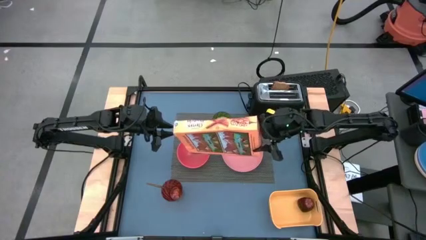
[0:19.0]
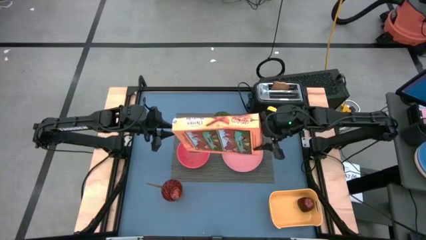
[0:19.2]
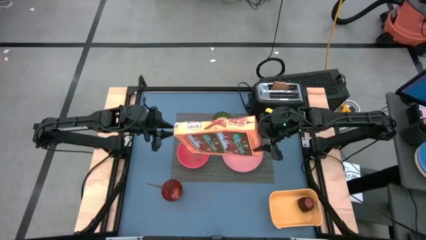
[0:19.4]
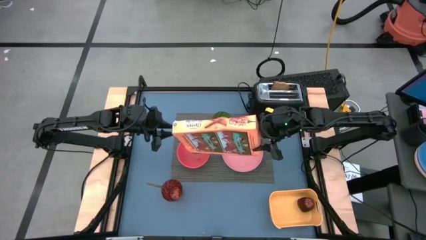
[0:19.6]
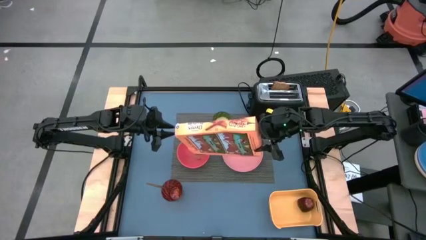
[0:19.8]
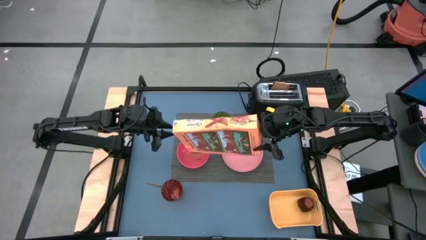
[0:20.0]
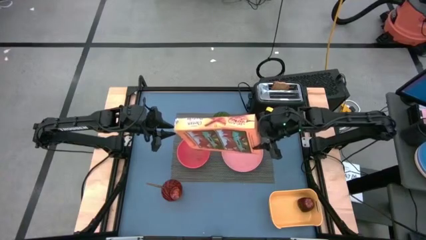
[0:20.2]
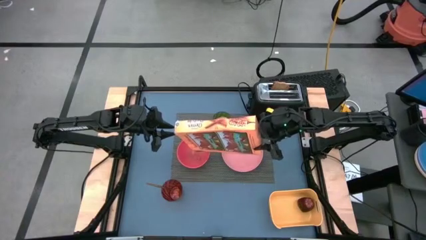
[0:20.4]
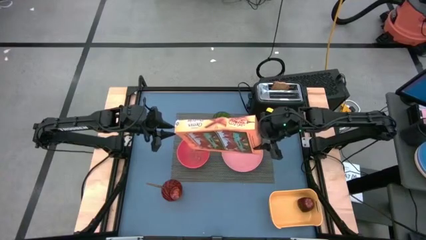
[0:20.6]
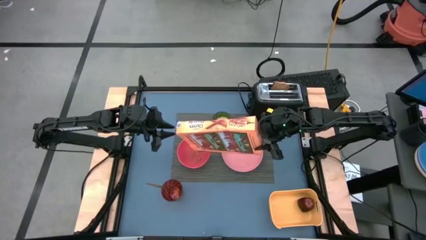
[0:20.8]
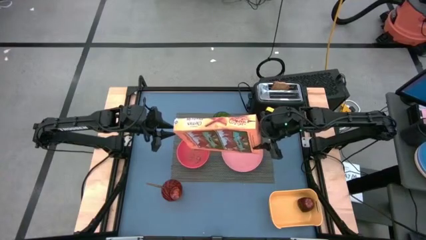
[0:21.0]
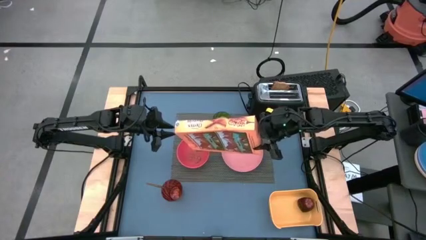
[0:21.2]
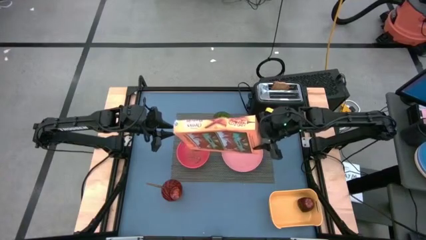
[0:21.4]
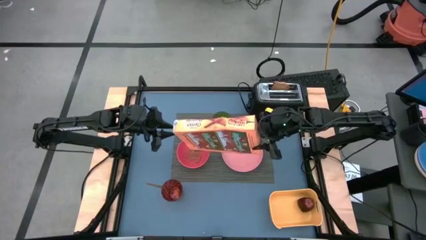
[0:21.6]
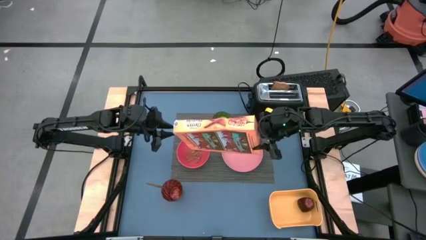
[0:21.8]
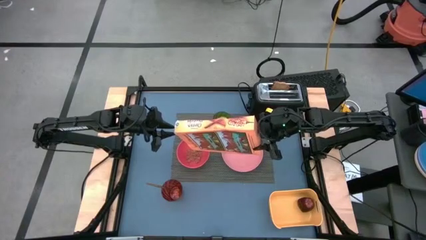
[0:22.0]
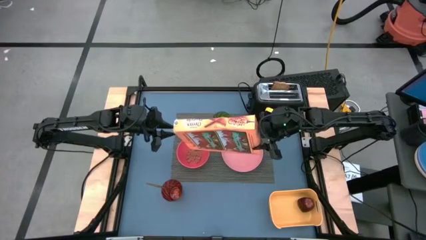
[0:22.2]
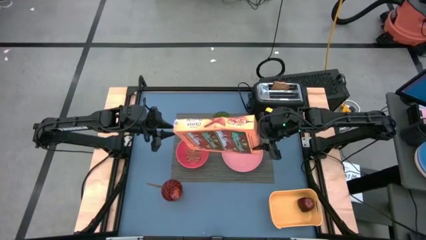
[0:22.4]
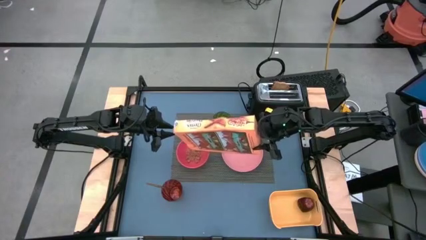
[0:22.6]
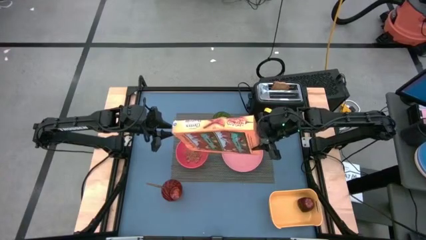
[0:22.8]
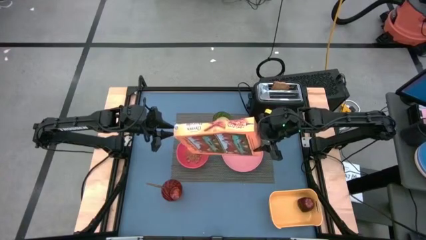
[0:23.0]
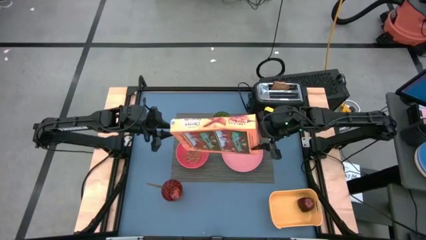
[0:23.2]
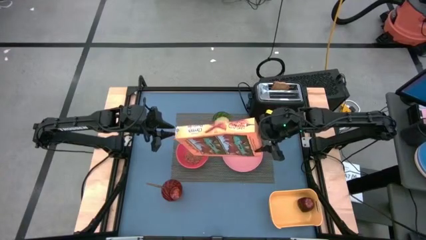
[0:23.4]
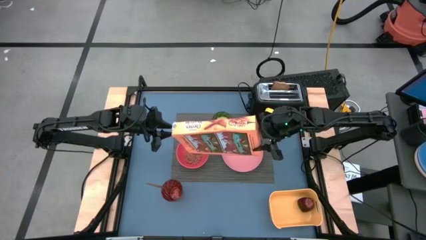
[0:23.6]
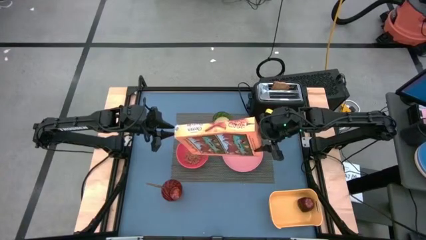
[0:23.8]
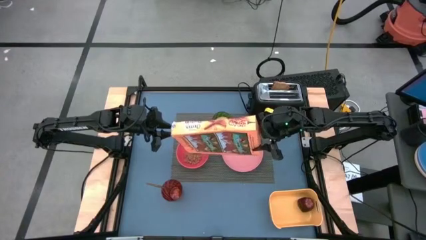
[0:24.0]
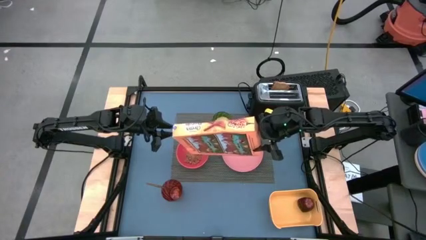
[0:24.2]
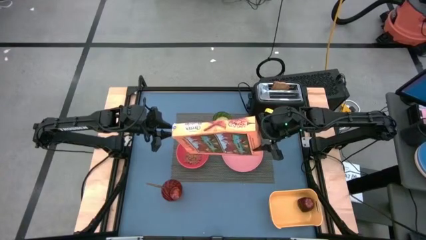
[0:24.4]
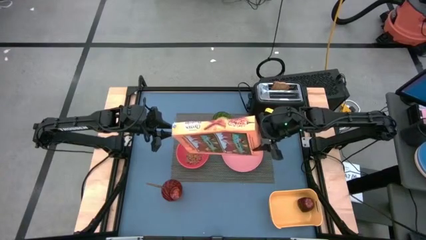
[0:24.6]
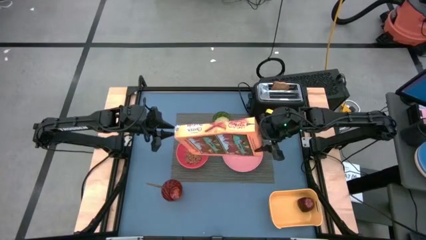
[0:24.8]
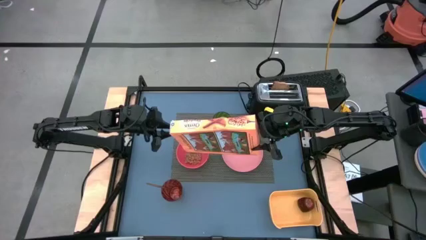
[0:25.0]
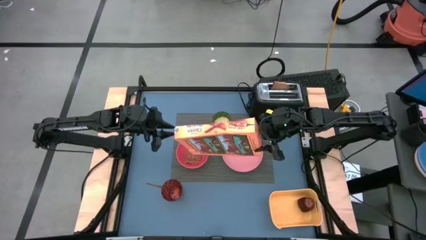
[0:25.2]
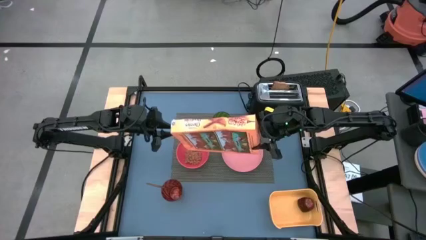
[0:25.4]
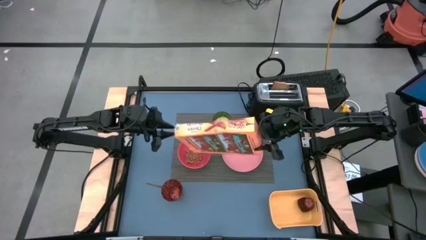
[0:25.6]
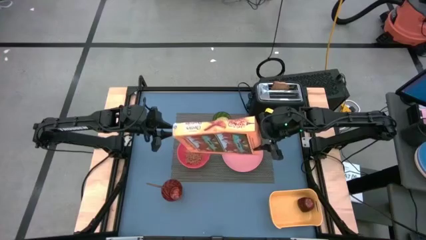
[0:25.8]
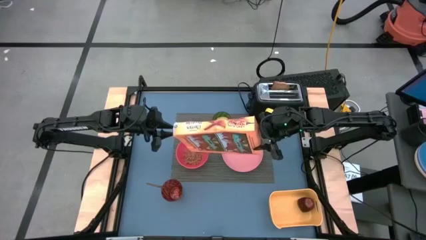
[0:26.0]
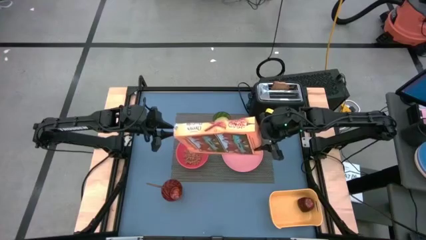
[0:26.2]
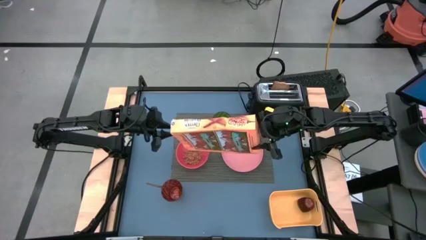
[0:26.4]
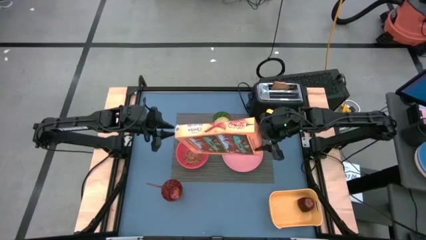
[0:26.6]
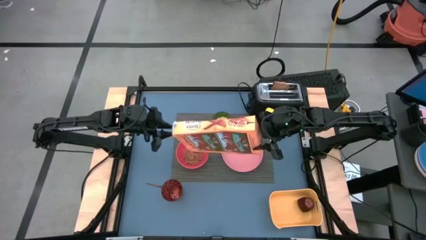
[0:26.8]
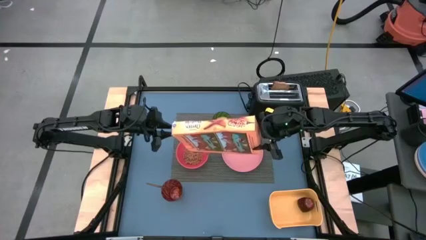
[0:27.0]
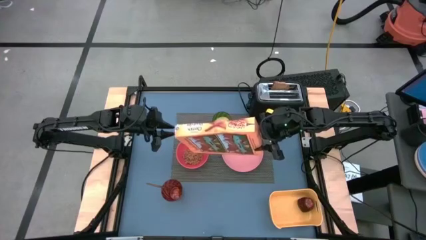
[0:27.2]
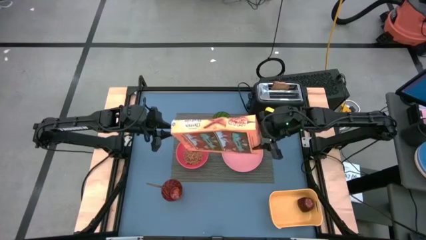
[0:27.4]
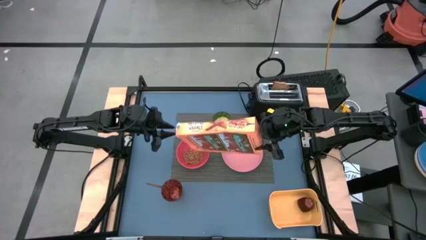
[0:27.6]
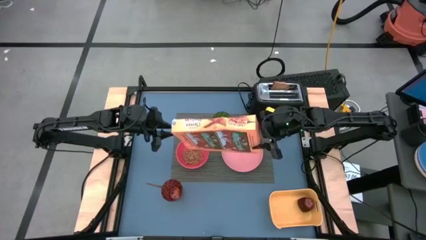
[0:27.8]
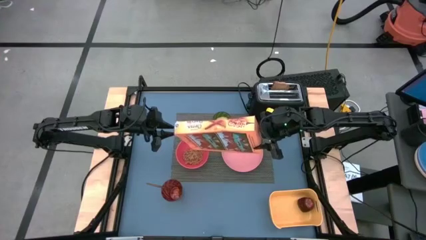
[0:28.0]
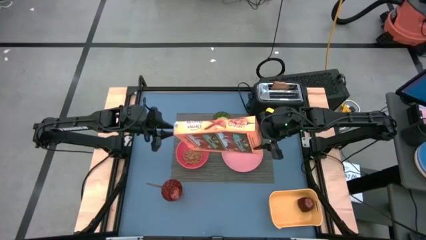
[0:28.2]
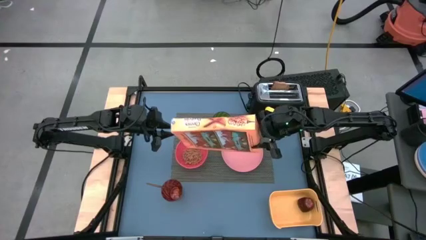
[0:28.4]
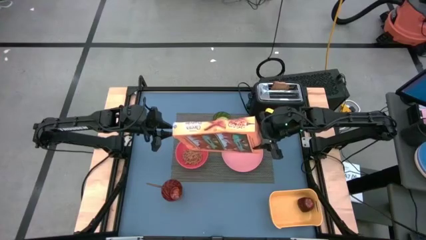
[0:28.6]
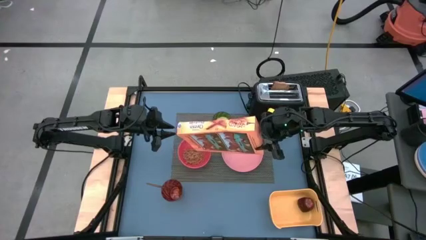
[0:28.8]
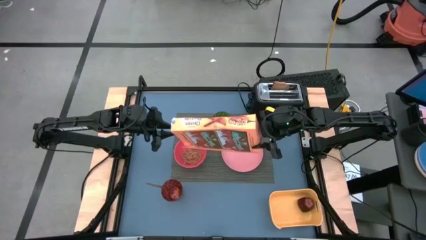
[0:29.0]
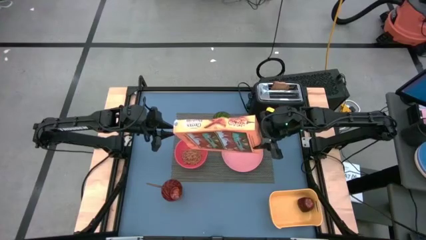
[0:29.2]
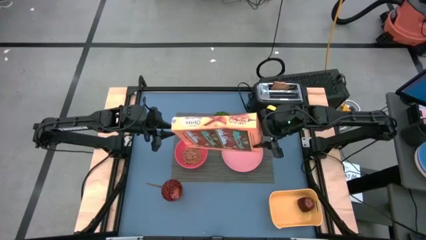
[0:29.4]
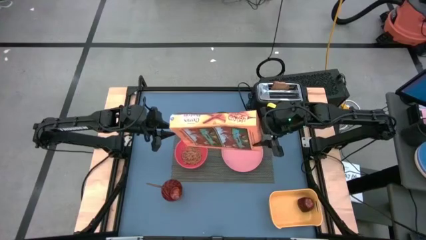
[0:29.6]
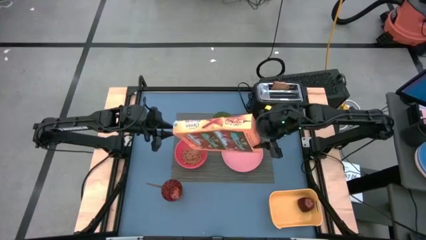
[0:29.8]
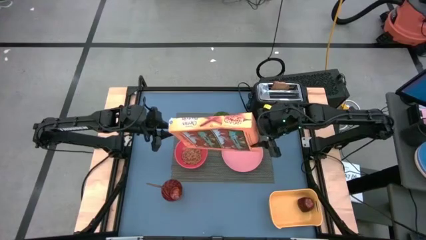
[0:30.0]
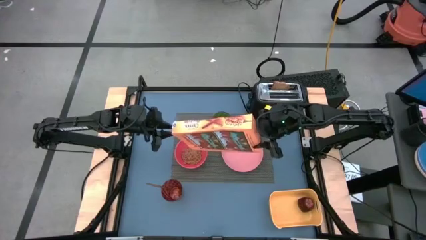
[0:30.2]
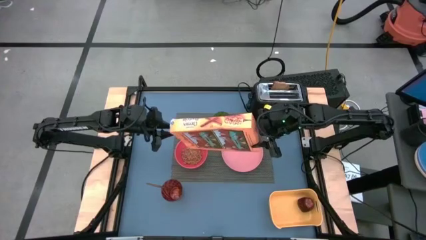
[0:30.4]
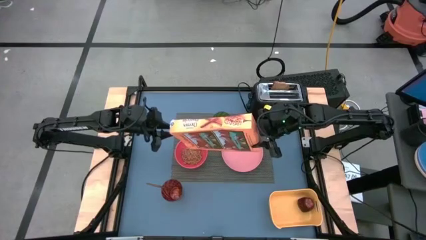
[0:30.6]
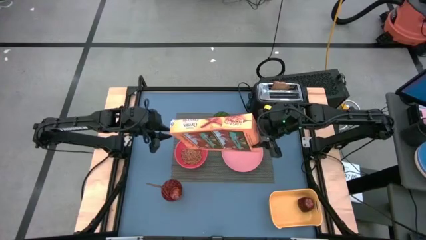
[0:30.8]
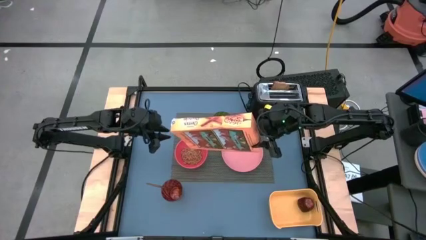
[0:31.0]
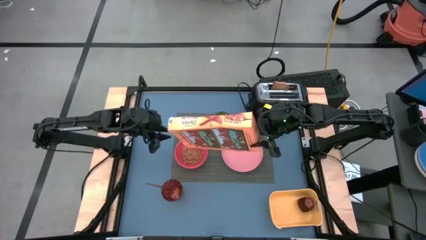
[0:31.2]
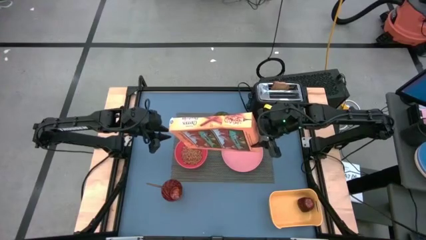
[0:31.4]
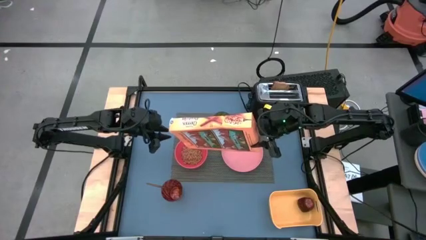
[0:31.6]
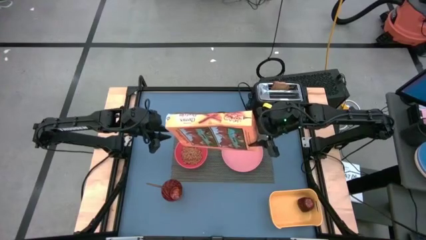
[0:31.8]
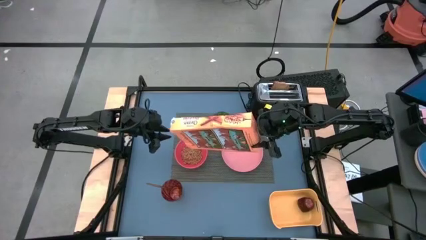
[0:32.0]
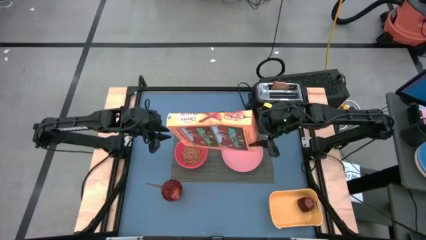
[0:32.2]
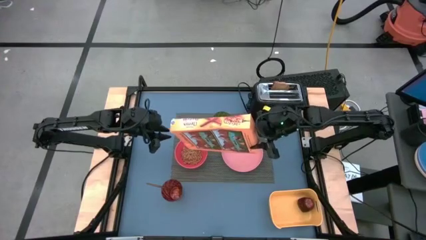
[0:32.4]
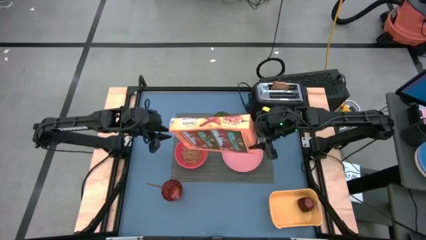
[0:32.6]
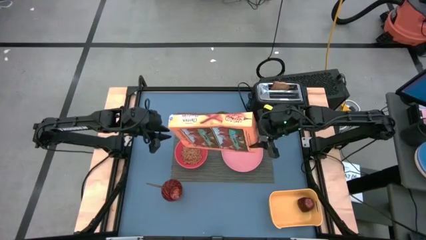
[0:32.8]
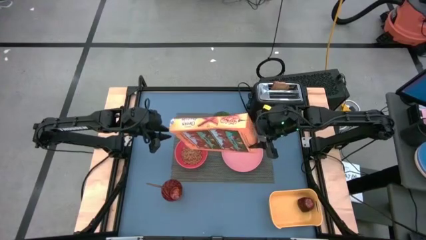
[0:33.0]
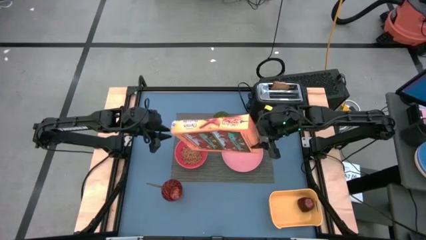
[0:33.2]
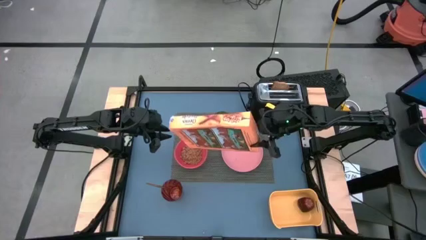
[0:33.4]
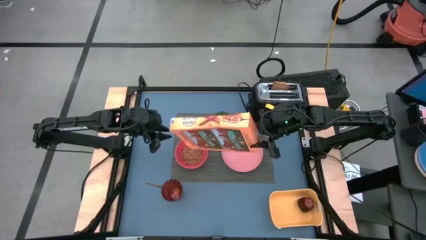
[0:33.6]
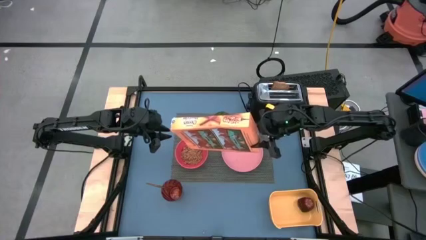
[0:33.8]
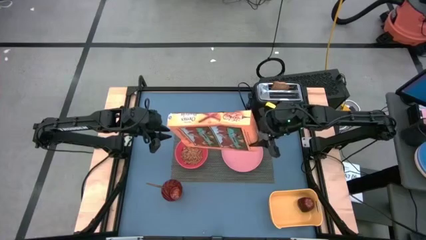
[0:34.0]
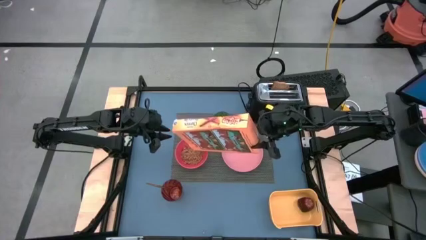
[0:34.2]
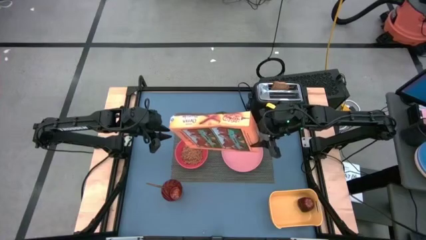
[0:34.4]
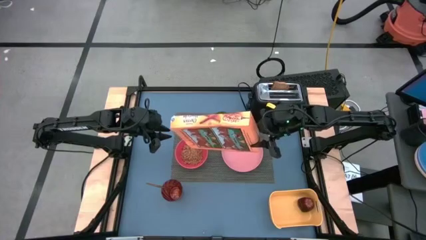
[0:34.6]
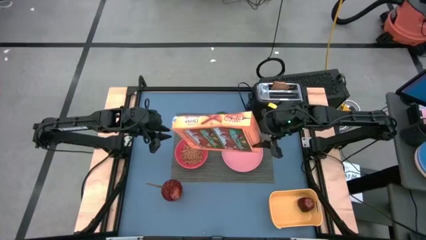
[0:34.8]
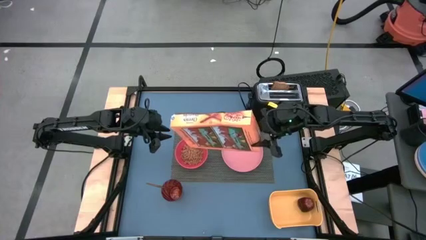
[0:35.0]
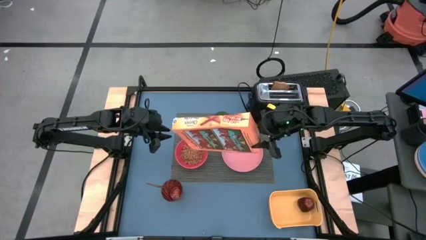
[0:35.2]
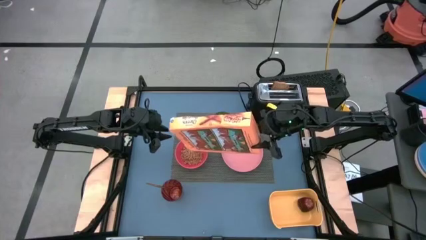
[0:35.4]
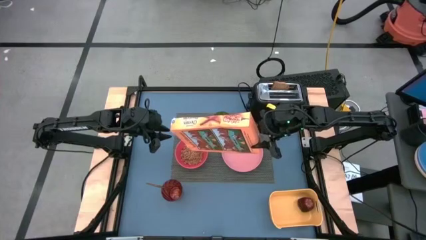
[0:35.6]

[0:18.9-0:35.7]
Task: Arrange a breakfast setting
Pour the cereal into the red bowl
